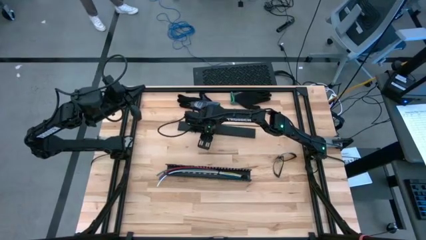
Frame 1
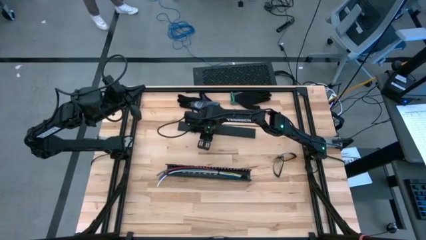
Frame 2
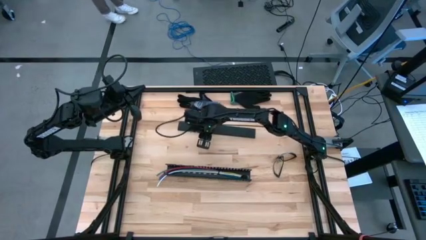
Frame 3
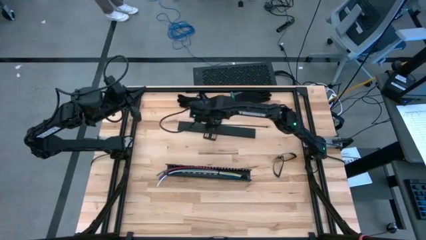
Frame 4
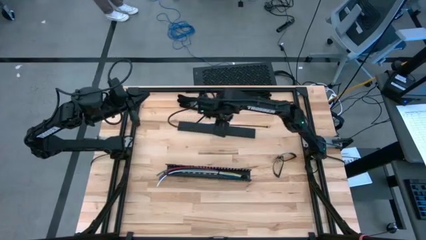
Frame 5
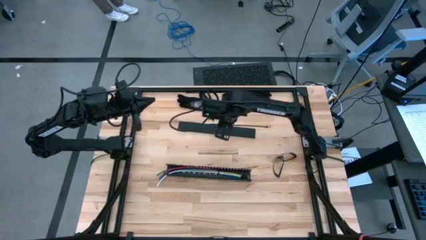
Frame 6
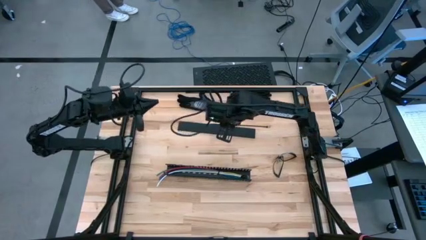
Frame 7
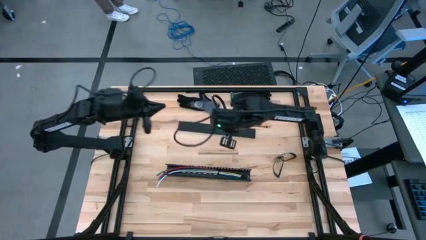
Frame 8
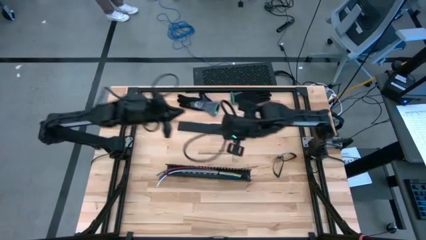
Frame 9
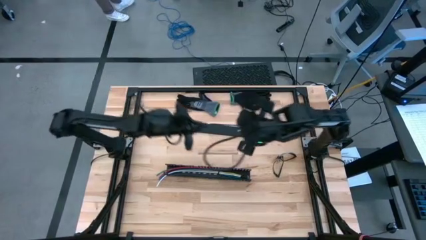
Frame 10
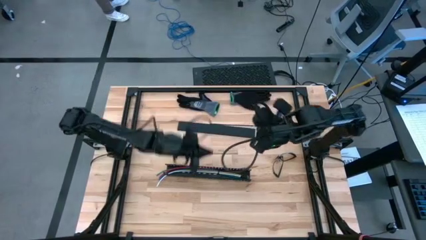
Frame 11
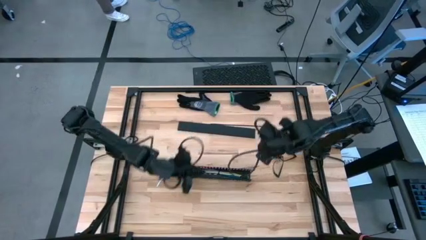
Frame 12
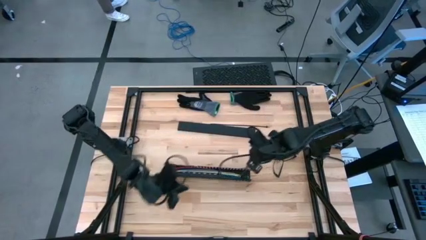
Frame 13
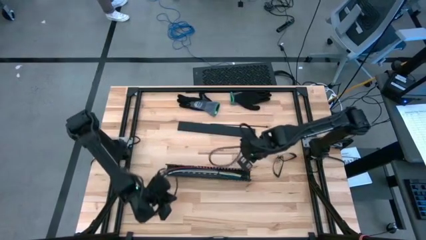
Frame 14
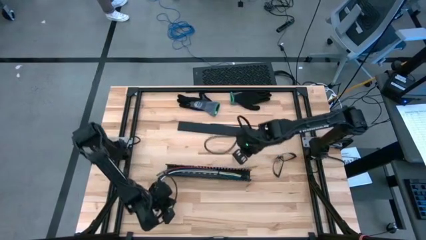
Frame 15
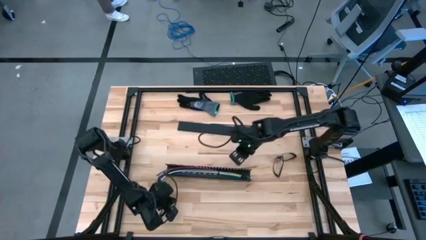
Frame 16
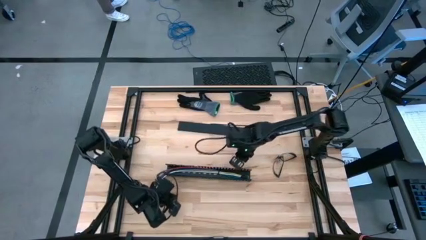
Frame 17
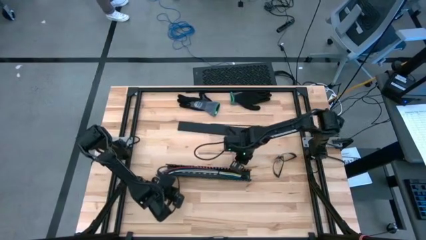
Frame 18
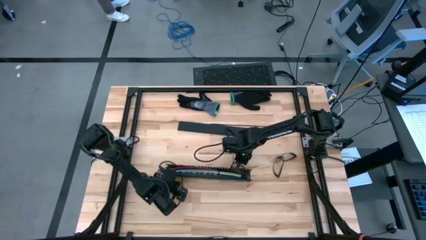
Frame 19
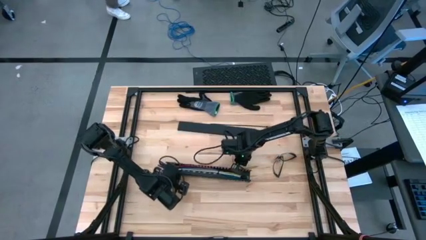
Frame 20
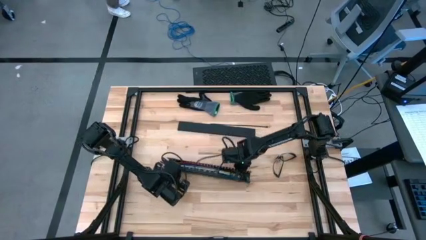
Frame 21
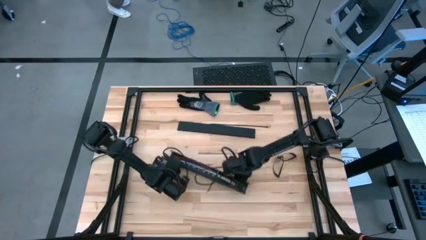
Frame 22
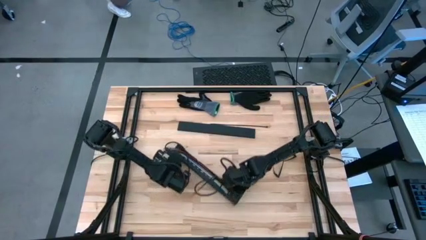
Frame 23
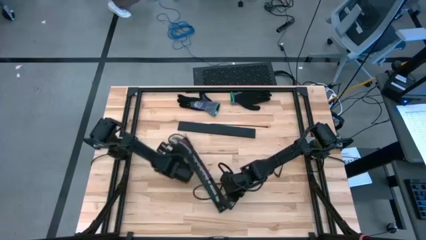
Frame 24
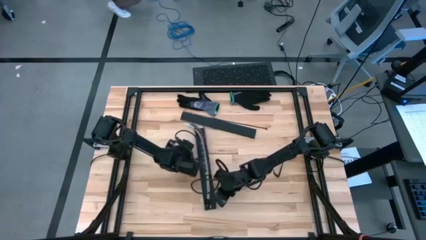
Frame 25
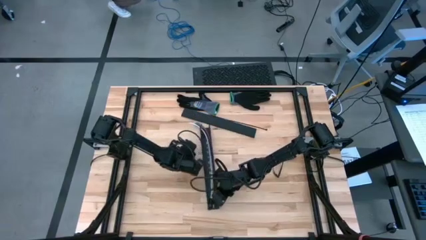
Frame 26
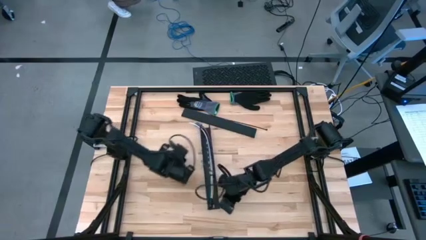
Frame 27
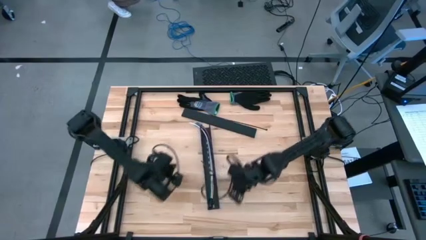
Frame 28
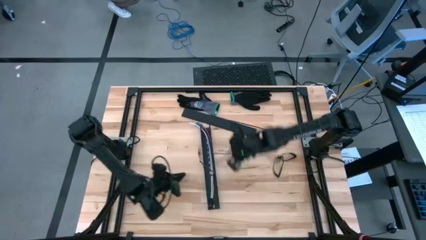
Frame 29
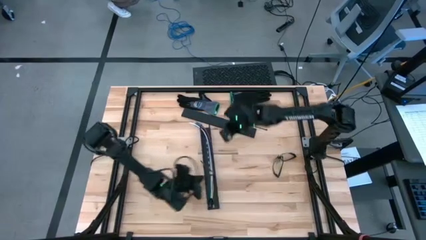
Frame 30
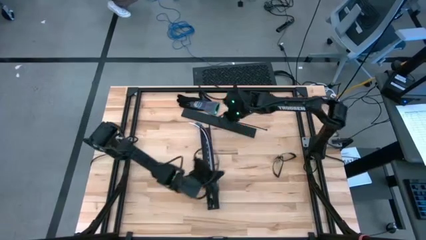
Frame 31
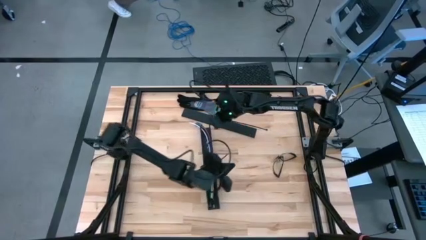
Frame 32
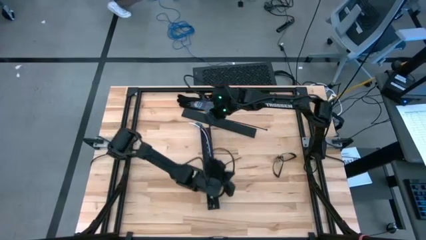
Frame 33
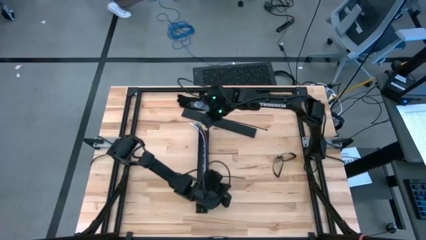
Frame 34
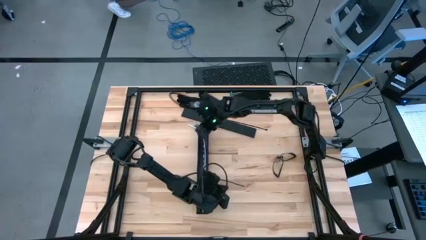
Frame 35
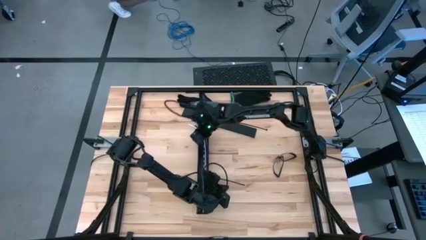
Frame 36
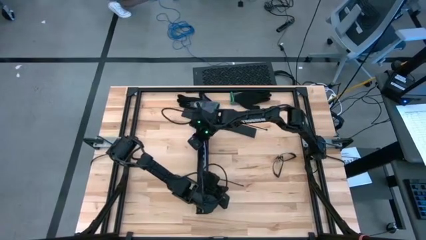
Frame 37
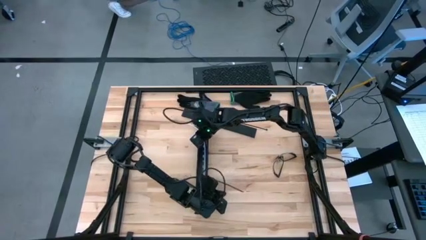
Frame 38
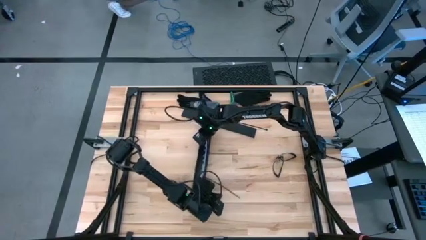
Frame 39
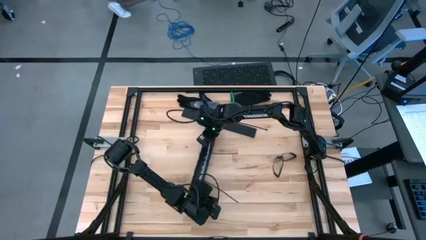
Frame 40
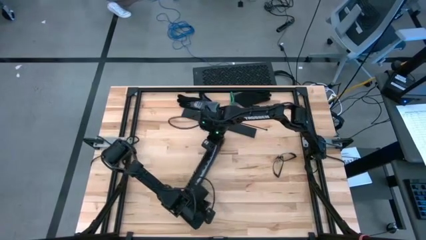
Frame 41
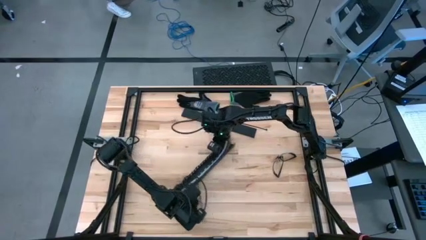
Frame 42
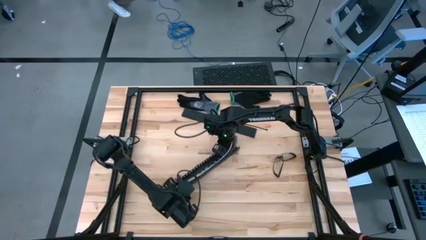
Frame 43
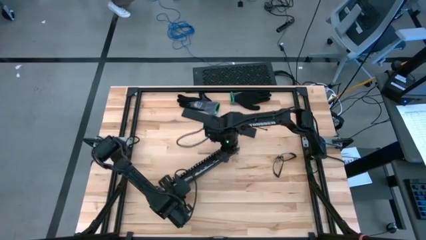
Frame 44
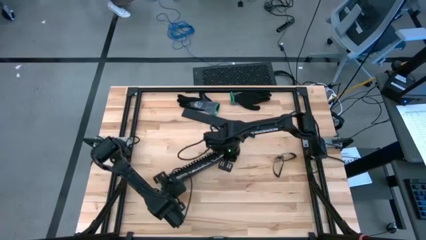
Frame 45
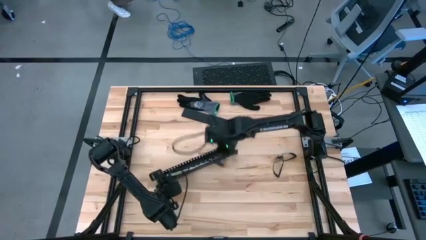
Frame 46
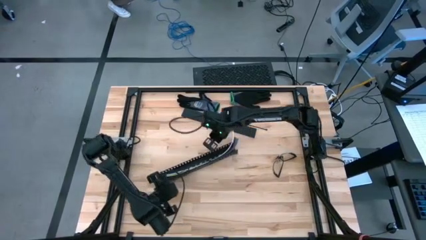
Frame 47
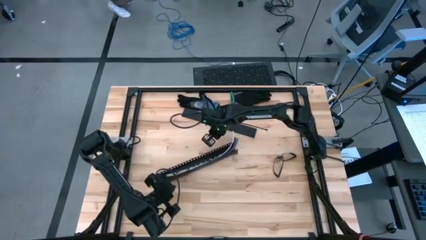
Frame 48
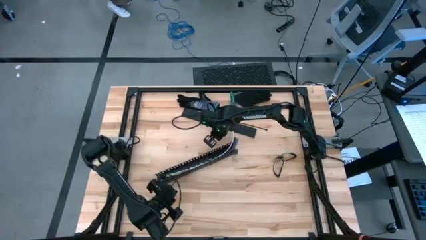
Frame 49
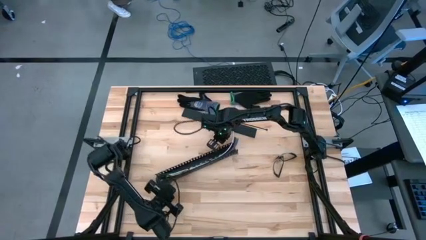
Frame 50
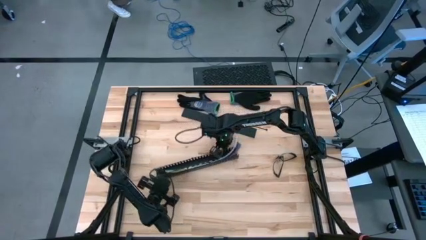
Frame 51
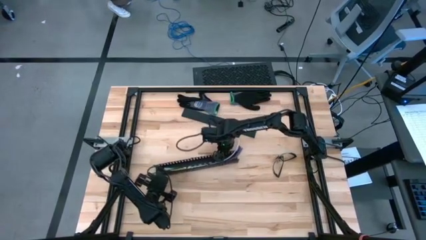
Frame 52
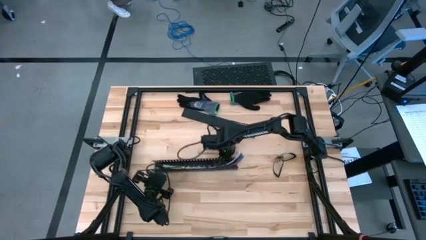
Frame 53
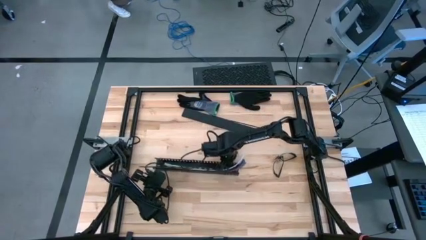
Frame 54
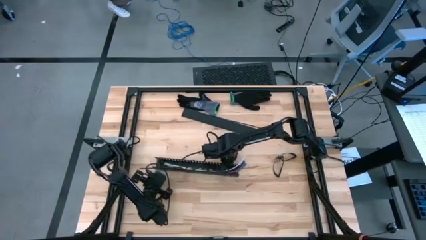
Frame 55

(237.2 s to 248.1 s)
Task: Ziptie cables
Adjust the black cable duct
